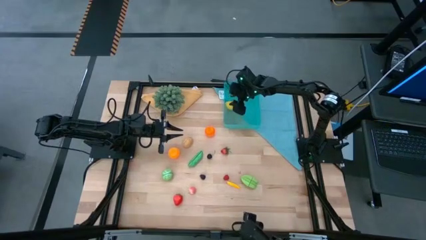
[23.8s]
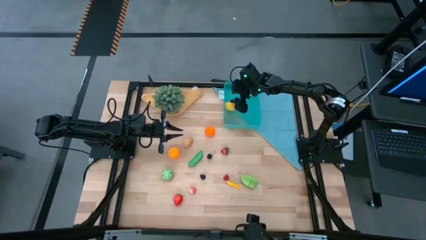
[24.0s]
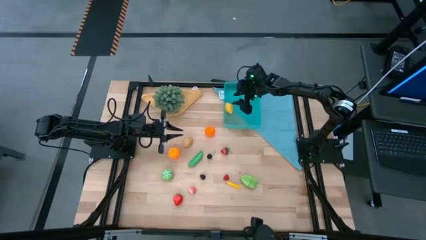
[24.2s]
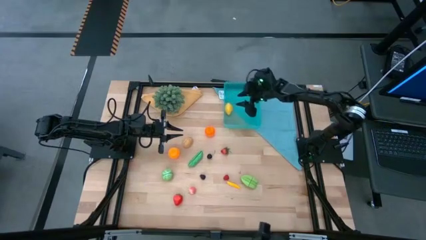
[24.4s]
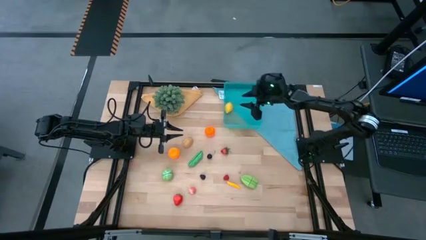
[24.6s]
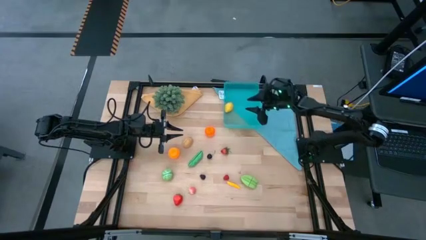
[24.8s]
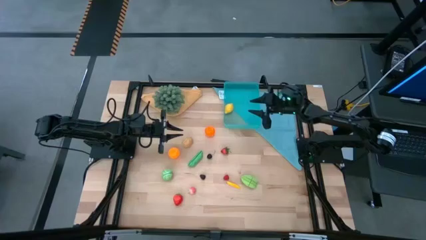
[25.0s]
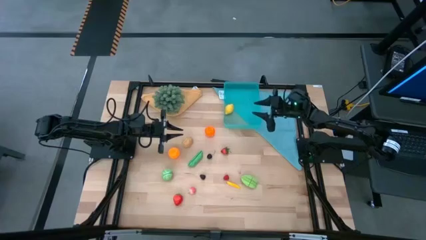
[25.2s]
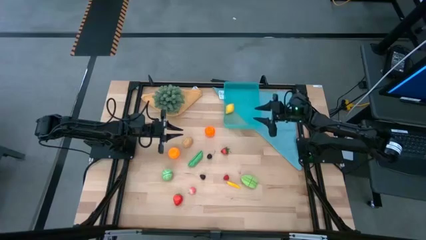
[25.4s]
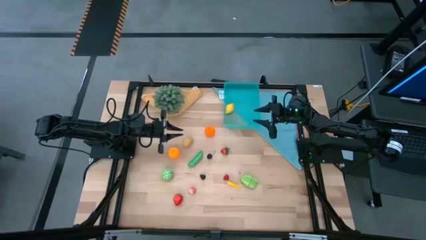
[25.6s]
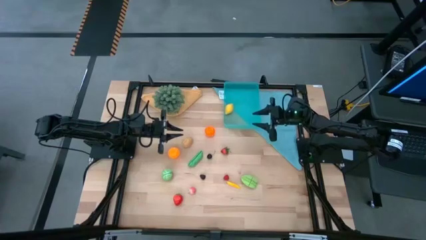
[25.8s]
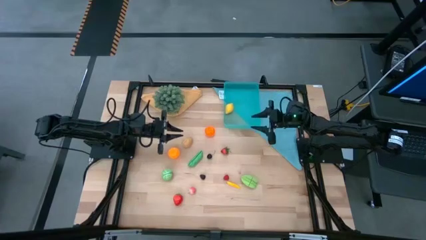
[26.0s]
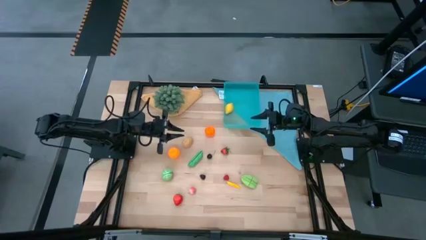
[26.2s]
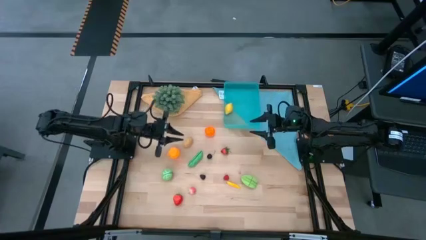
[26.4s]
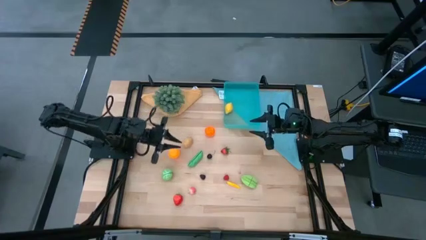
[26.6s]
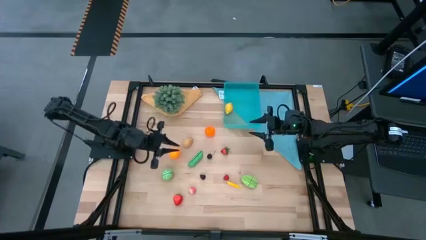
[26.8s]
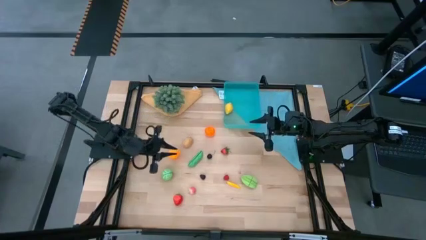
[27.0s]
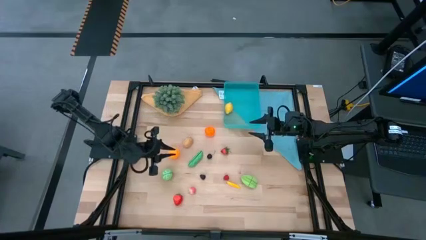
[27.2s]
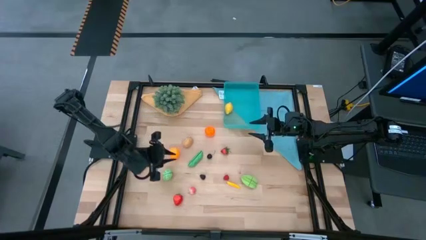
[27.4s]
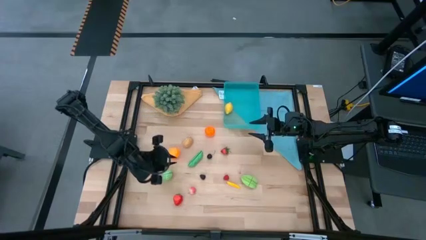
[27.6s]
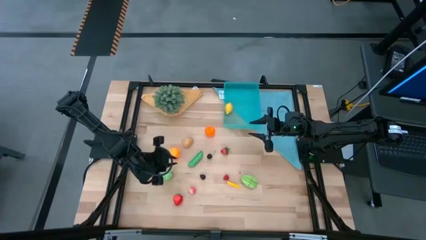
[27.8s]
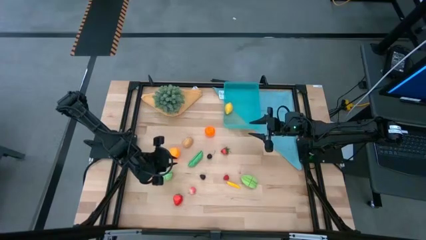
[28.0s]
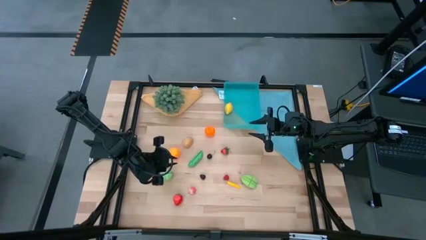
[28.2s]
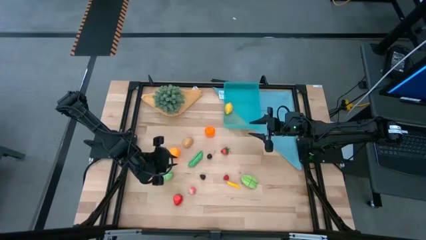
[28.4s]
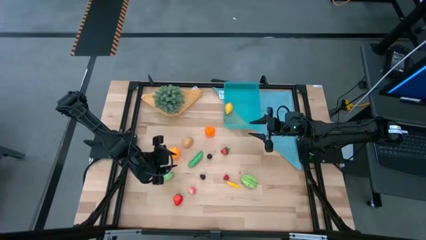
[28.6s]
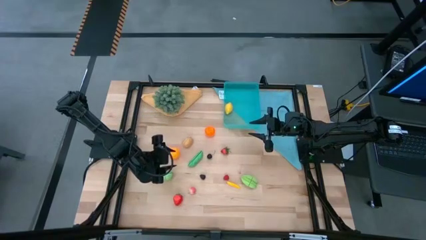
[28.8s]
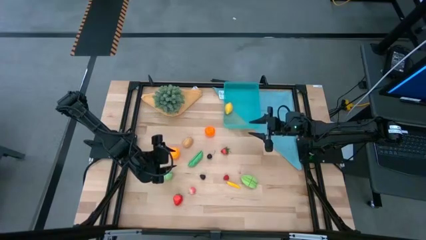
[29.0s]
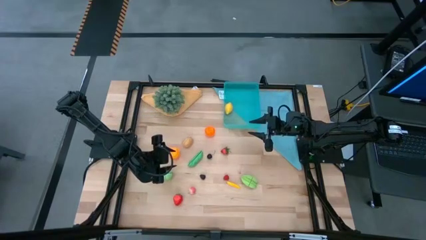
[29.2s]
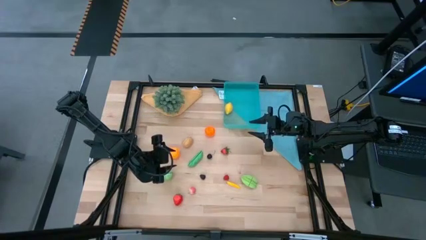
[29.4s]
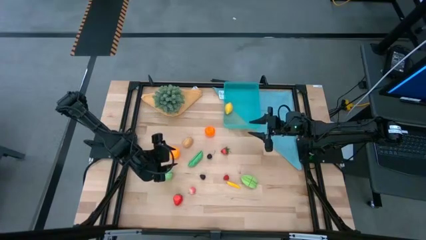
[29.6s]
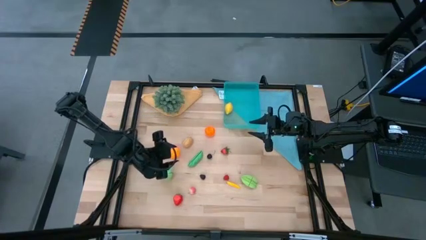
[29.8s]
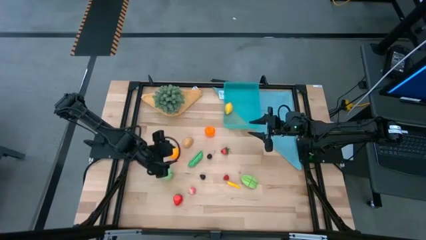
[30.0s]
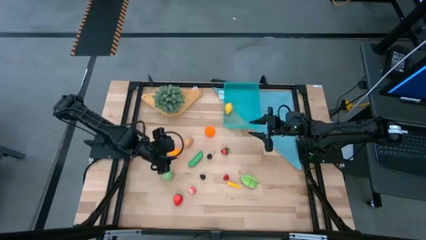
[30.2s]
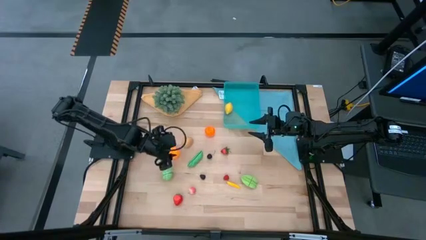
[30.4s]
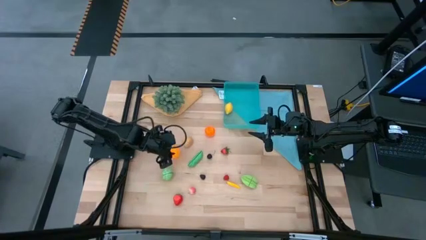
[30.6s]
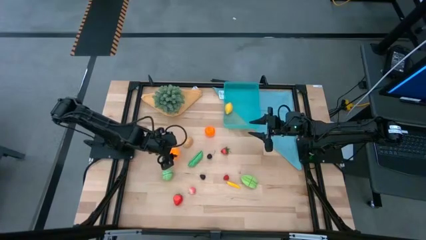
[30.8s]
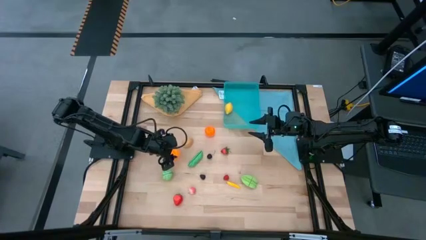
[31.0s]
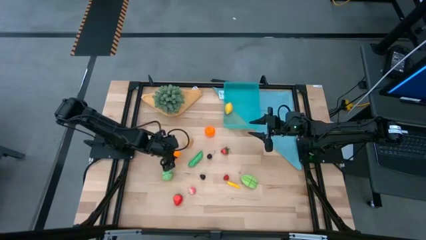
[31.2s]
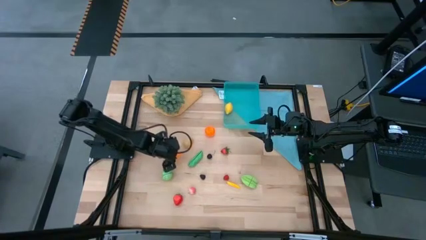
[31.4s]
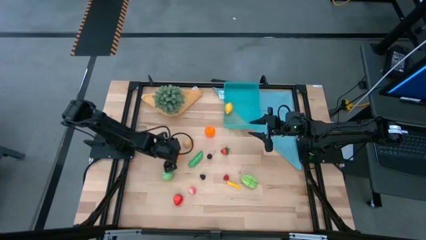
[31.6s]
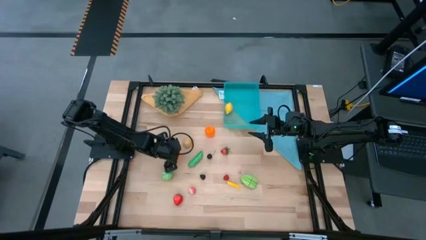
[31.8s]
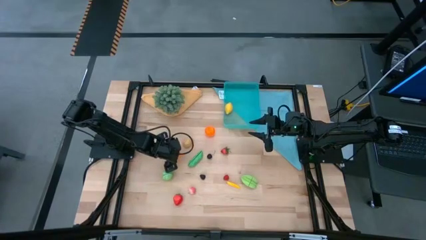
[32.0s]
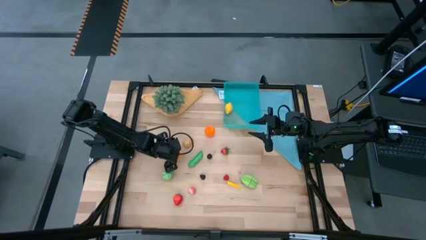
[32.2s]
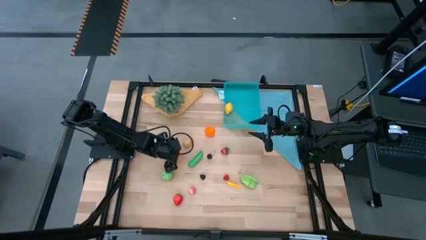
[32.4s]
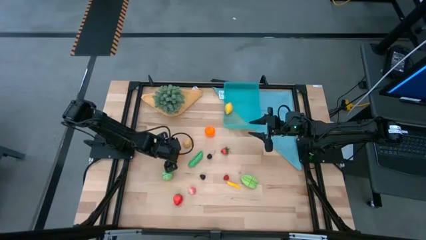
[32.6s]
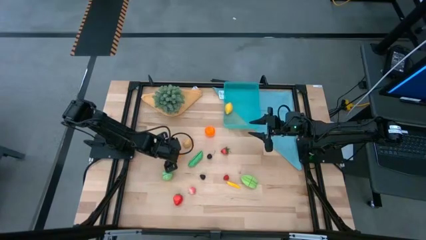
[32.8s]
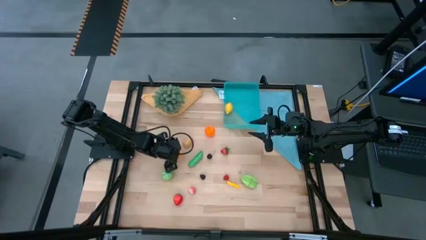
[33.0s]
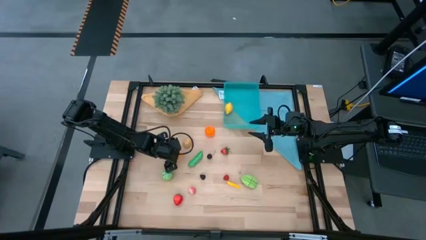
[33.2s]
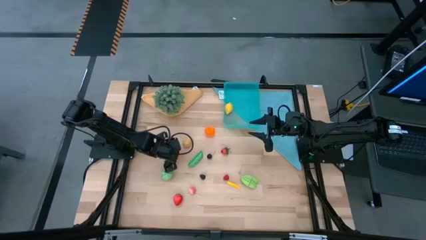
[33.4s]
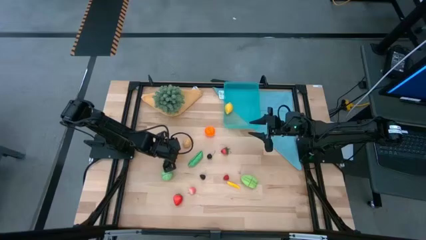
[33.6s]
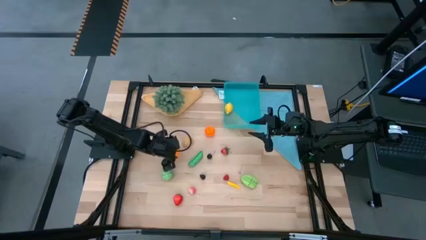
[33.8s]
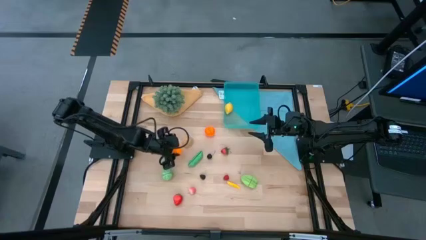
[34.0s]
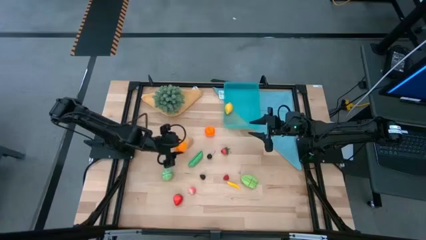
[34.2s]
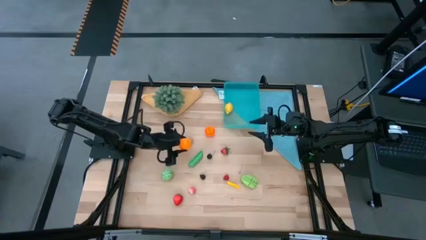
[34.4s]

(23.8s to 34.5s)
Task: Pick and placing Produce into tupperware
Put the orange into the blue bin

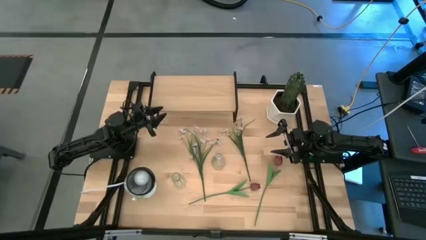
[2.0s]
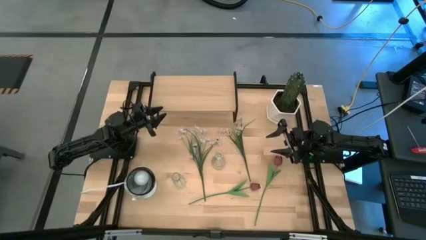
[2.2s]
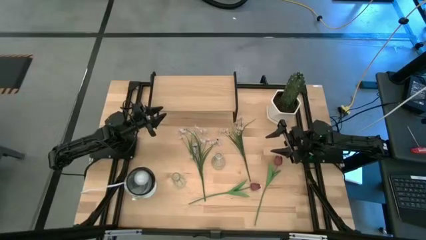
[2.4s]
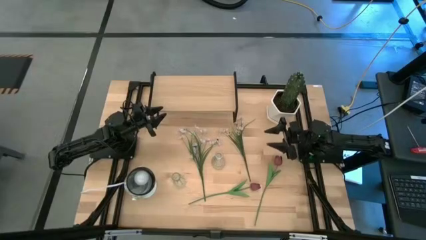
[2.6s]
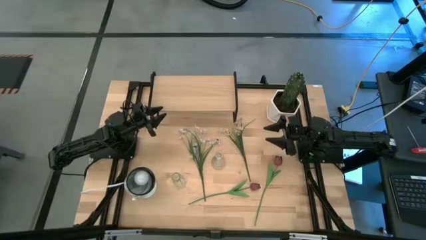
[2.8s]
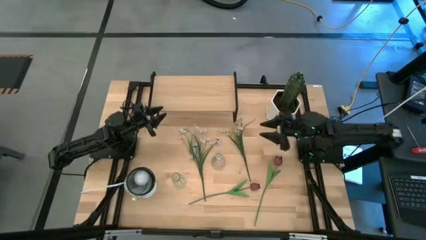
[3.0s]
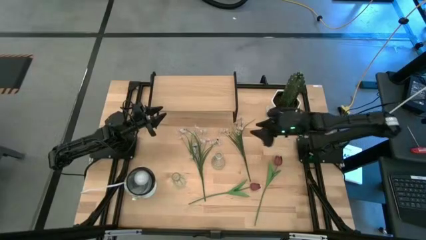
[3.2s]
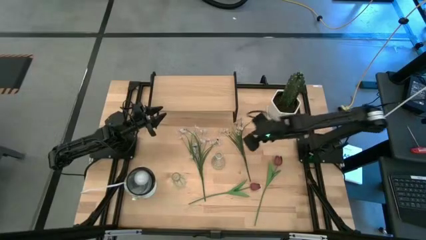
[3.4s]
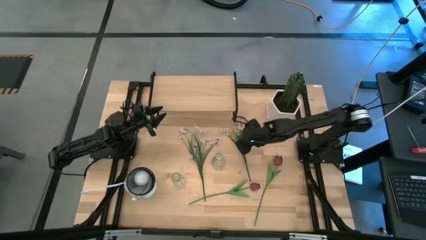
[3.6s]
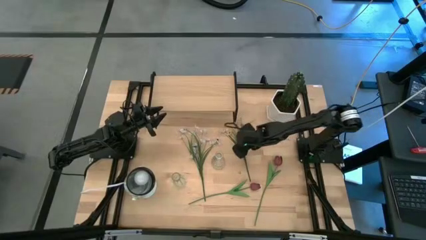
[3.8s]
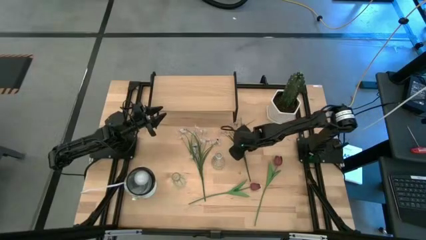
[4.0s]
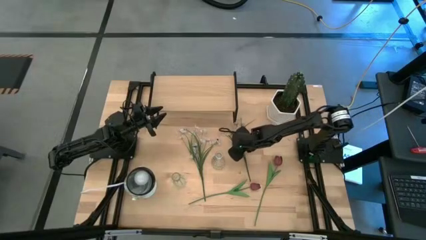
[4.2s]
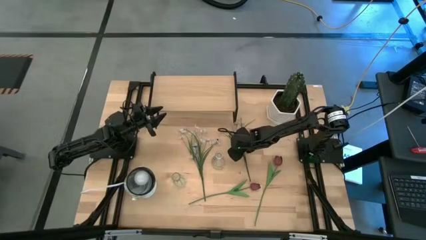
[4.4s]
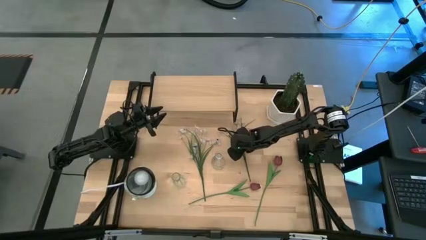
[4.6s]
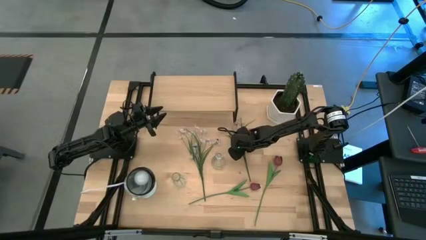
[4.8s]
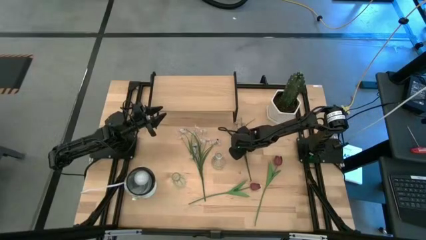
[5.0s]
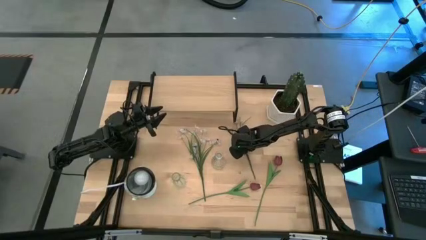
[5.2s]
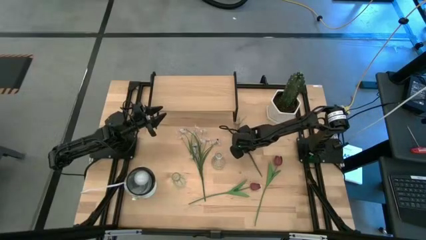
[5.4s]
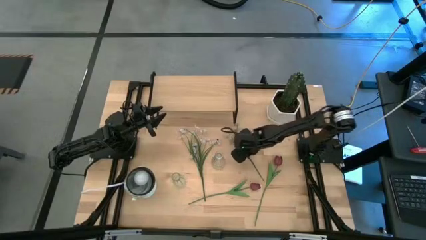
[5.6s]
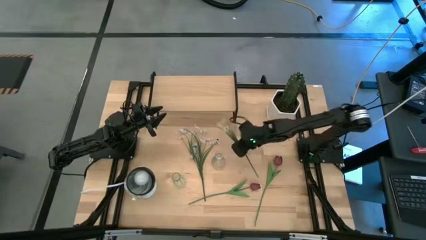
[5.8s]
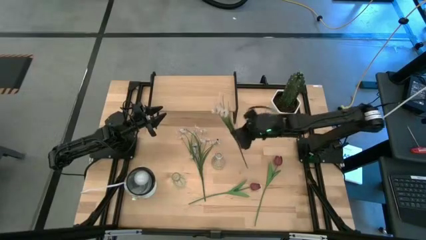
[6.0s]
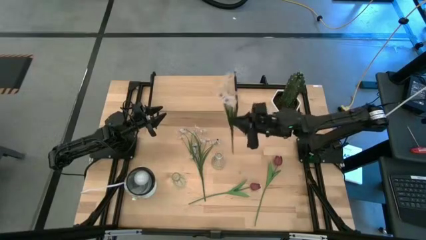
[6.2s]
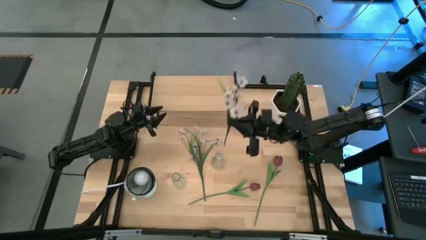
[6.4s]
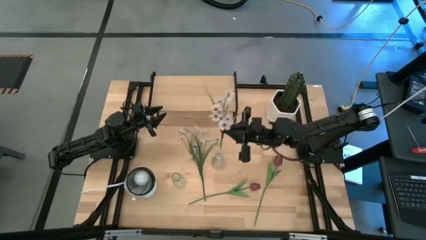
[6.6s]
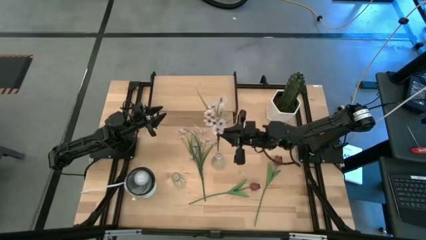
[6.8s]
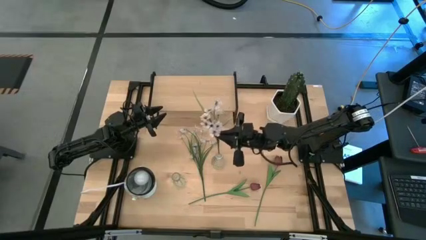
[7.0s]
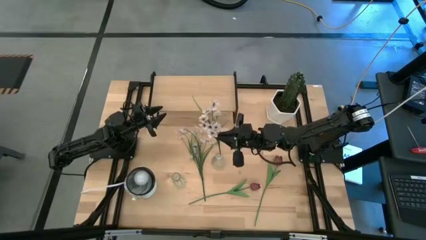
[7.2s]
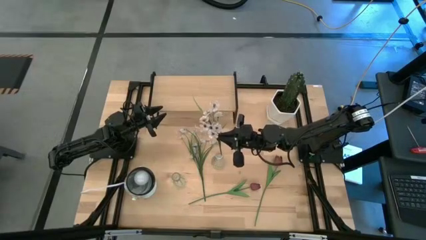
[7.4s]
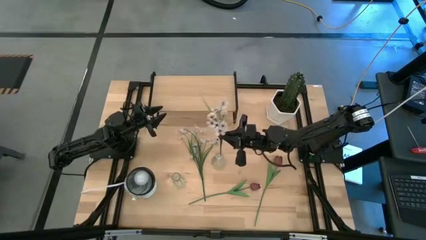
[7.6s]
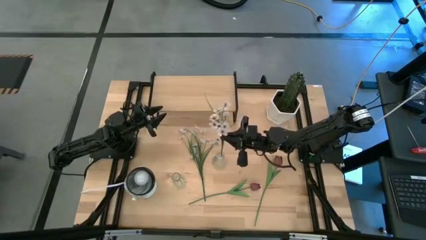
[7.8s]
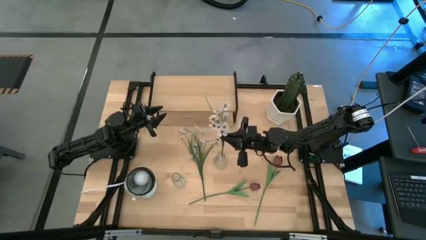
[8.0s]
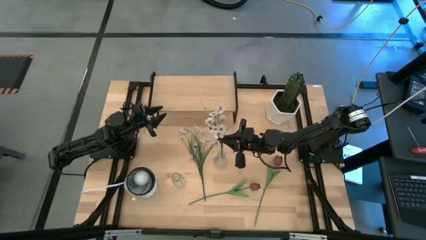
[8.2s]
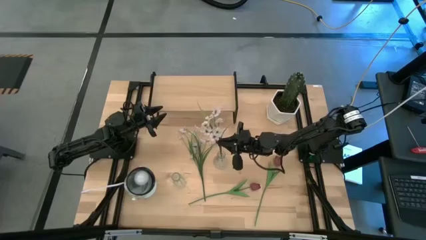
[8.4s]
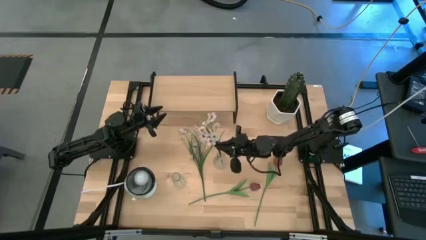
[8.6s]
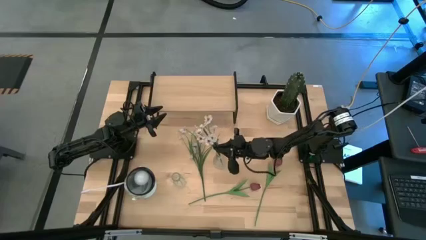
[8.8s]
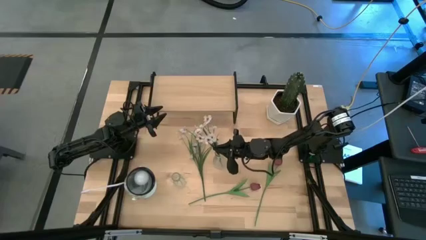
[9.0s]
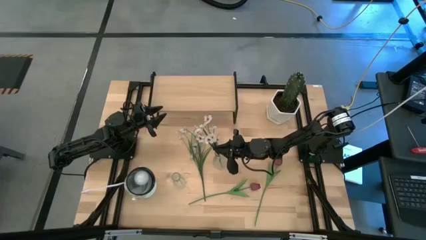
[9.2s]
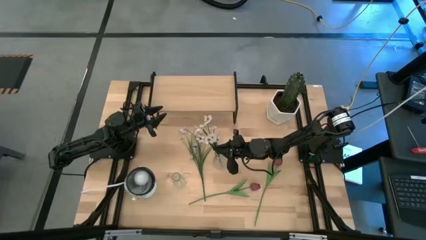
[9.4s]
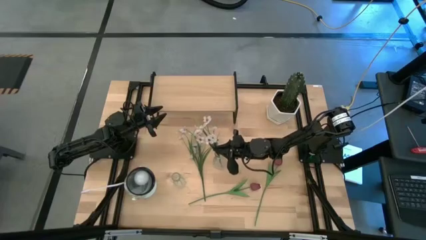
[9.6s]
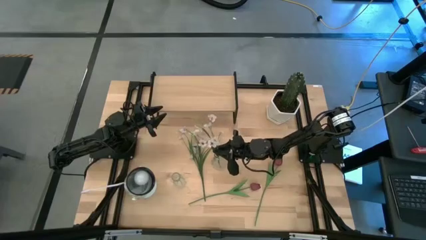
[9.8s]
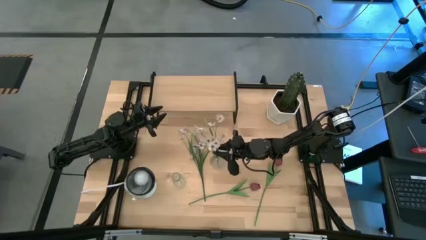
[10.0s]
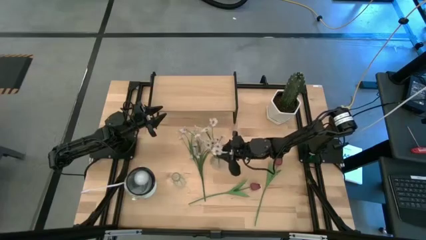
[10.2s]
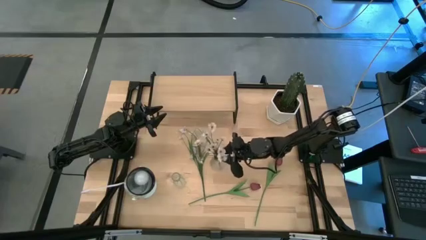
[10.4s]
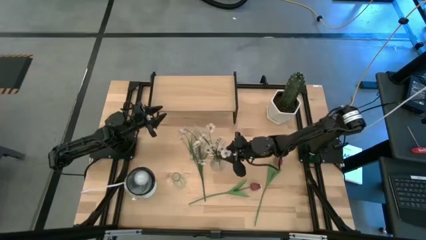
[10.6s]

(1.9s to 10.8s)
Task: Pick and place flowers into a vace then onto a shelf
Put the right white flowers into the right transparent vase
